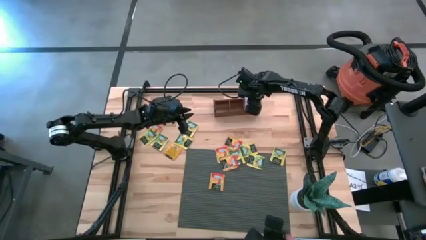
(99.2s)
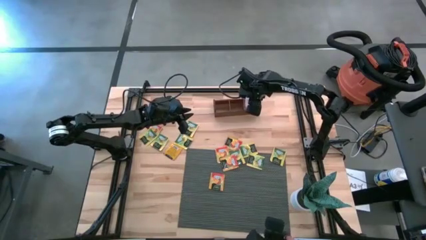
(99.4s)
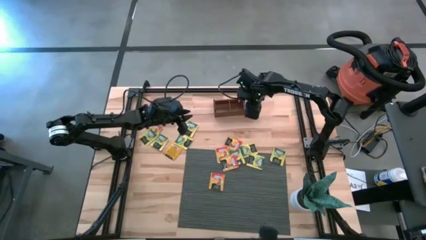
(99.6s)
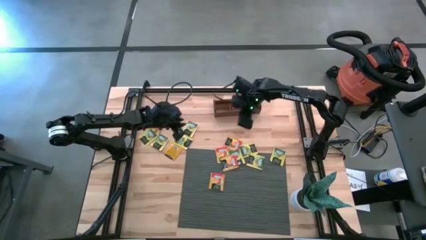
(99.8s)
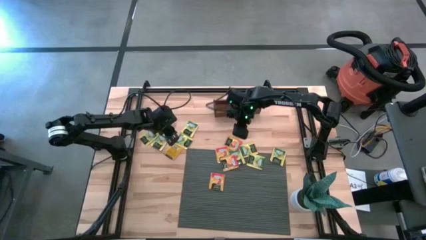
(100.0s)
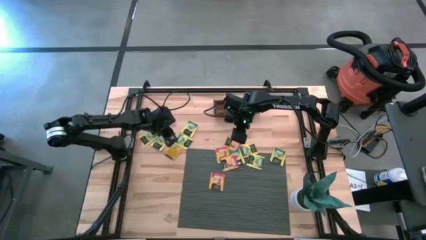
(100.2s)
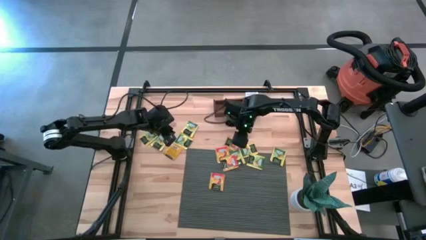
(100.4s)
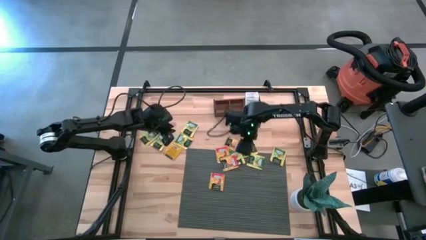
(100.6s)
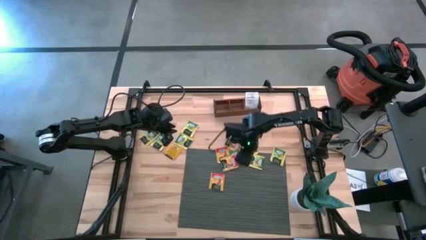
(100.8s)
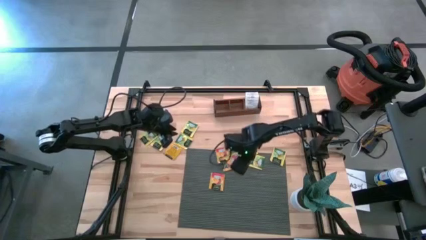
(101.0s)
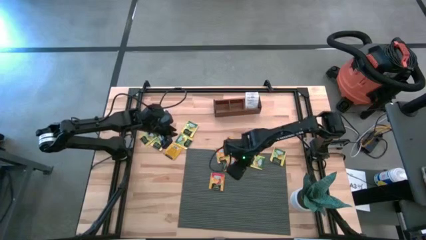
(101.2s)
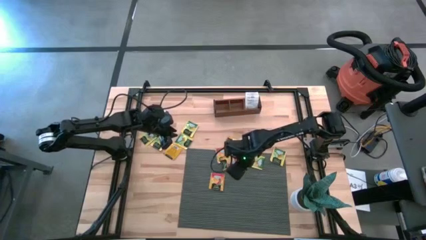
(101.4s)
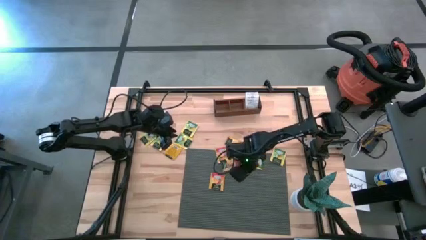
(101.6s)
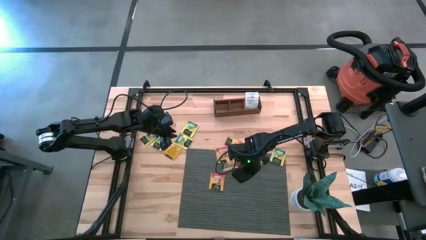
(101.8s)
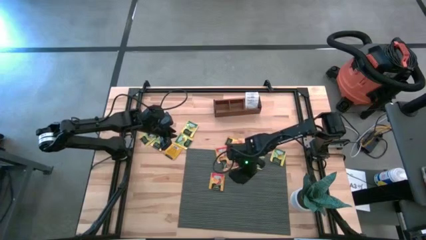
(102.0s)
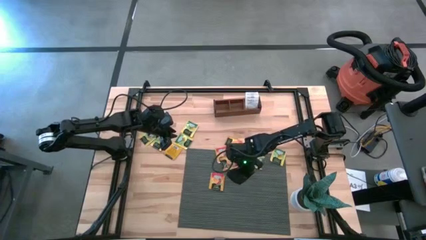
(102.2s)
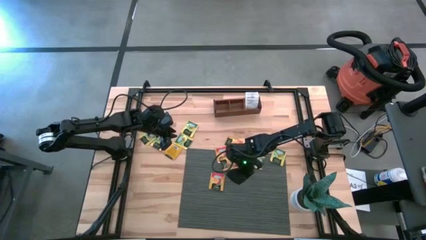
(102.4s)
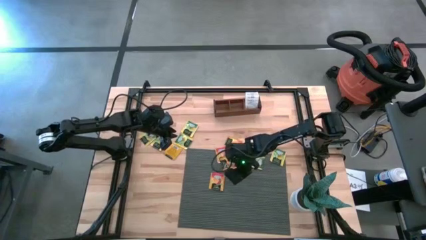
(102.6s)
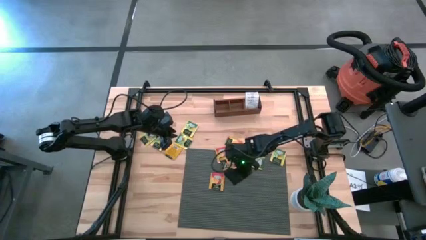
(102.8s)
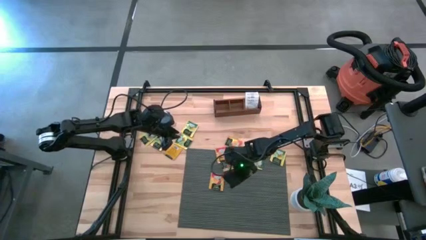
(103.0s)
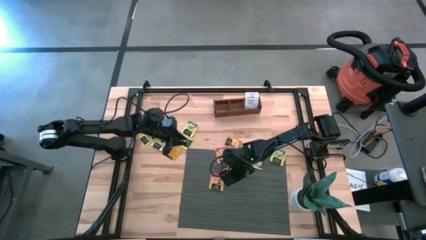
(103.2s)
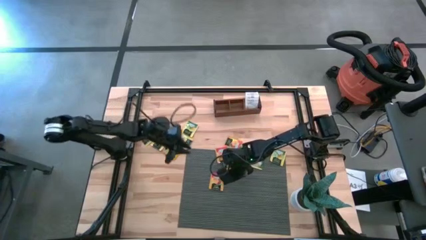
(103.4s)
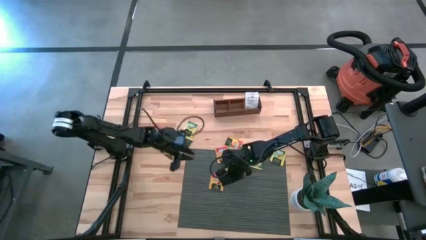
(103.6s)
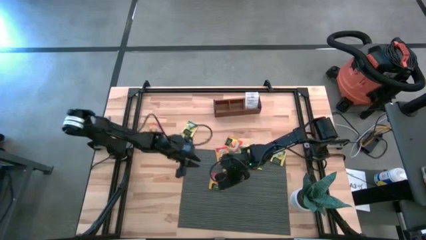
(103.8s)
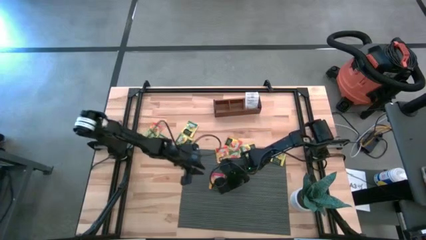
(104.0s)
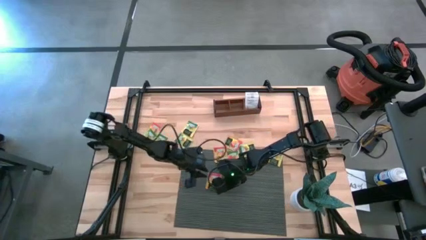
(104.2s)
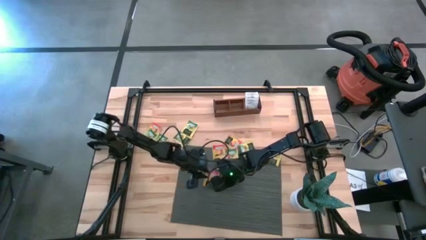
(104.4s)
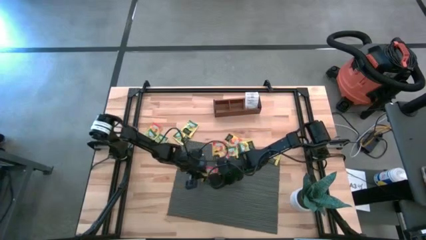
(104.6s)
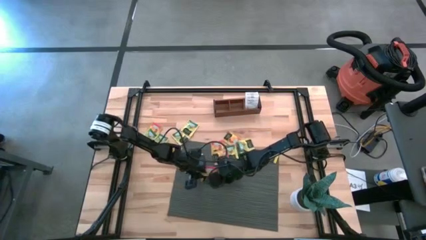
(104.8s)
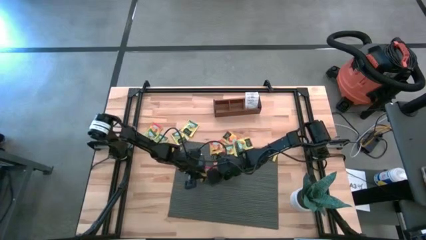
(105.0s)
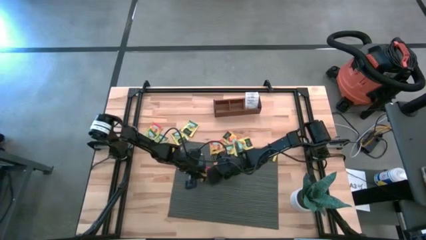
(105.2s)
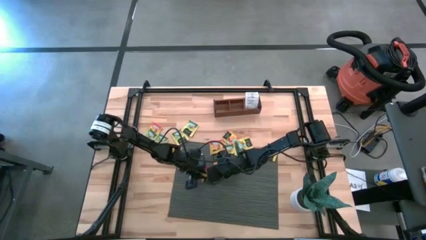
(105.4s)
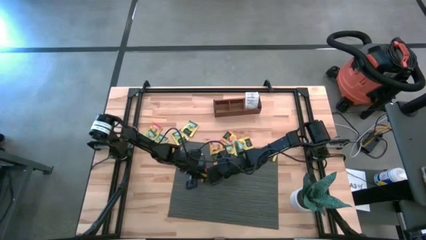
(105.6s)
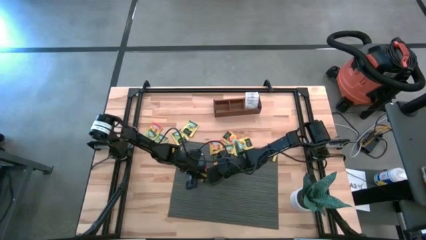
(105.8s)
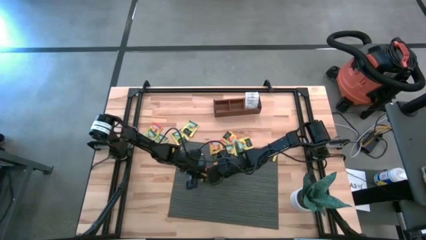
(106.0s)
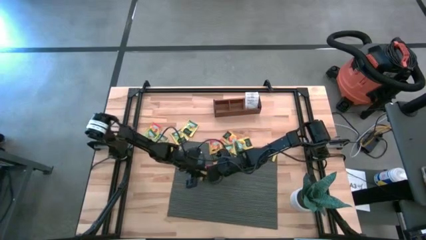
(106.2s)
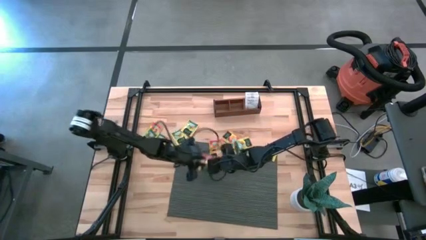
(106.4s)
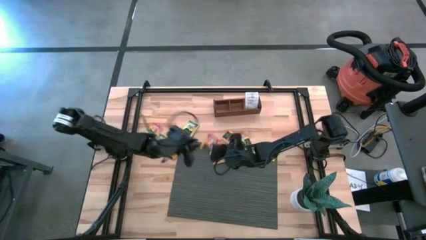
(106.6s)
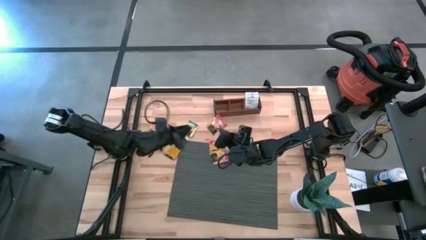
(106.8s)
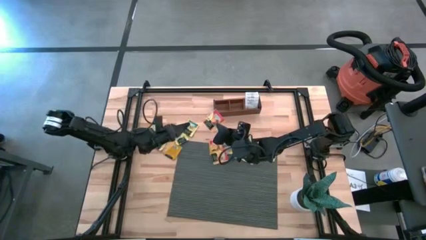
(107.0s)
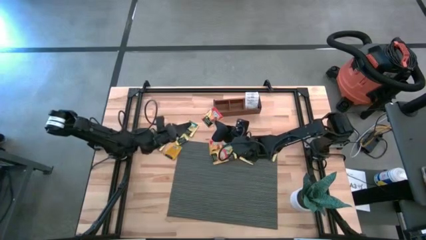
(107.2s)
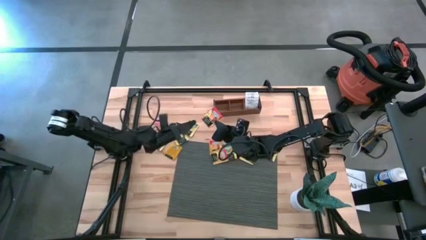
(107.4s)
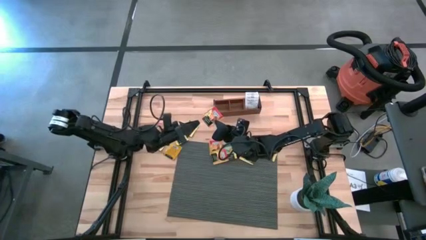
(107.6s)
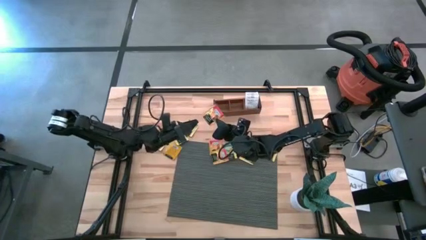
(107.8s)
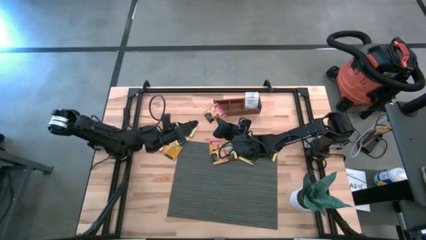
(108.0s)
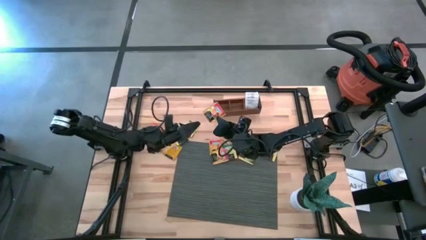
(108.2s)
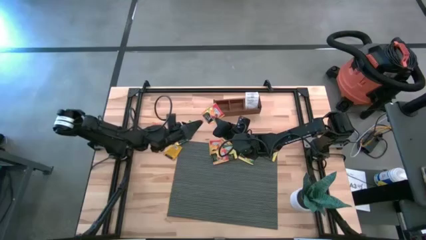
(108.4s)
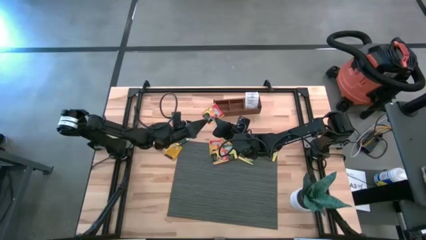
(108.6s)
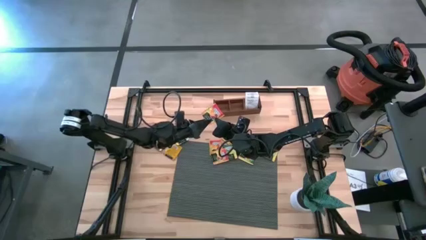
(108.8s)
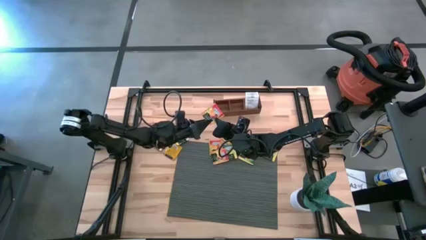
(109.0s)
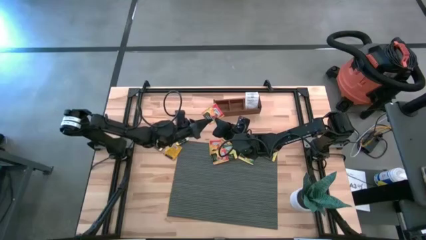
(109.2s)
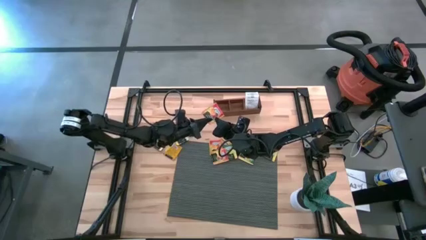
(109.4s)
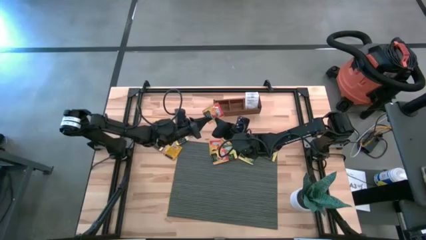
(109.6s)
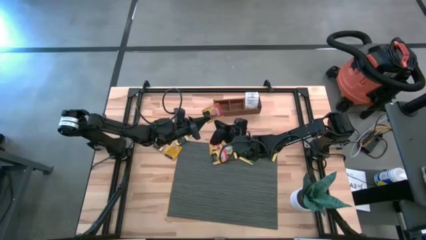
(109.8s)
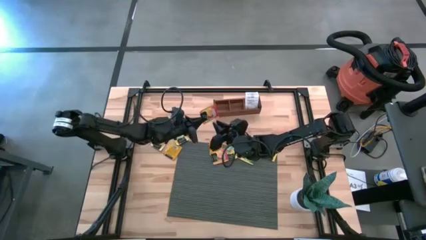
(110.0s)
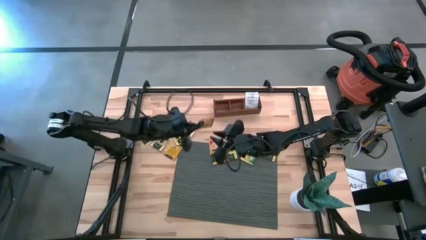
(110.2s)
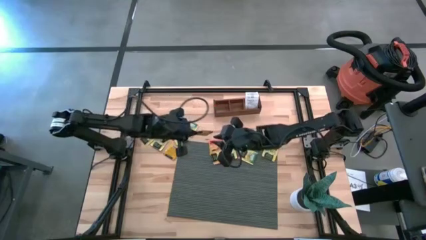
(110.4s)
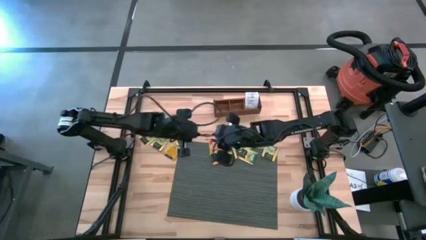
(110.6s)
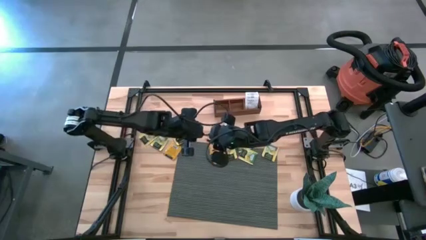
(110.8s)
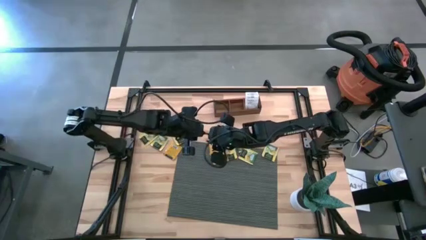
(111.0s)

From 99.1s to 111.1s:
Task: Pick & Place Tea
Put the orange tea bag into the middle section of the wooden organizer

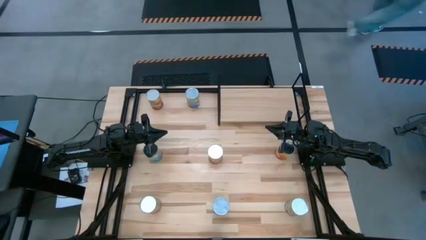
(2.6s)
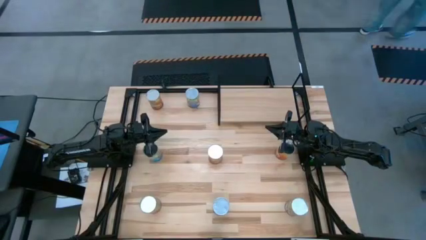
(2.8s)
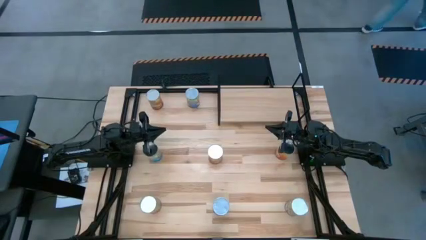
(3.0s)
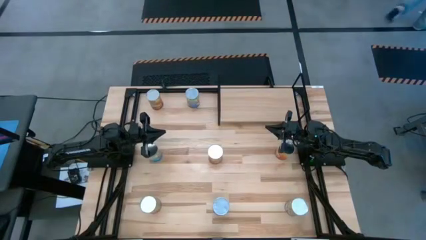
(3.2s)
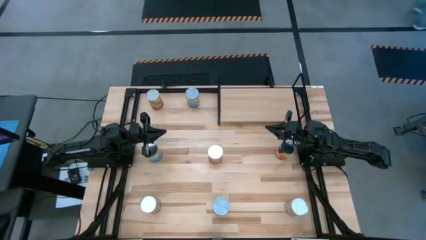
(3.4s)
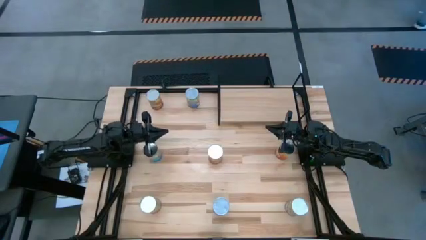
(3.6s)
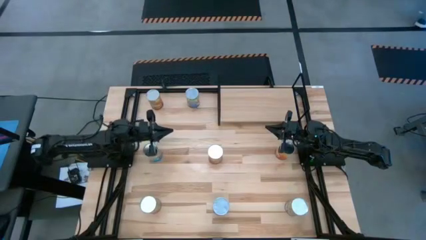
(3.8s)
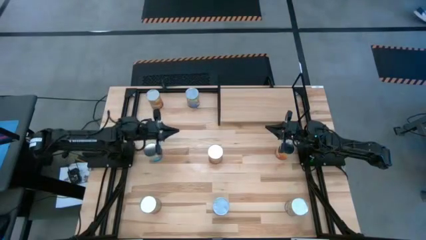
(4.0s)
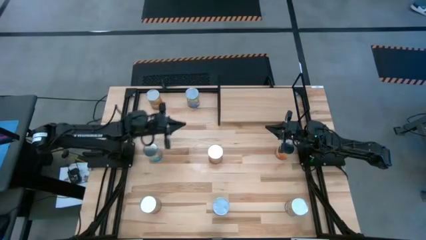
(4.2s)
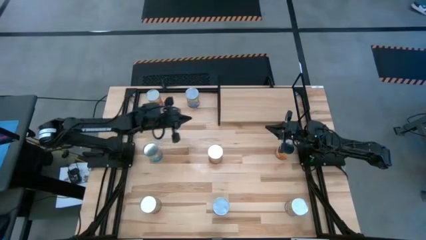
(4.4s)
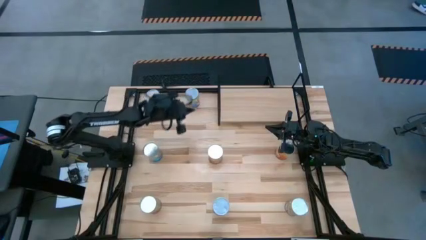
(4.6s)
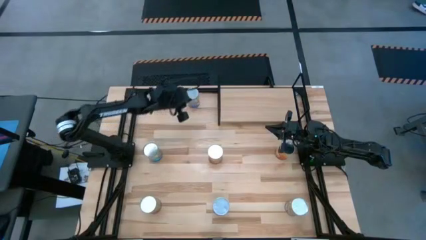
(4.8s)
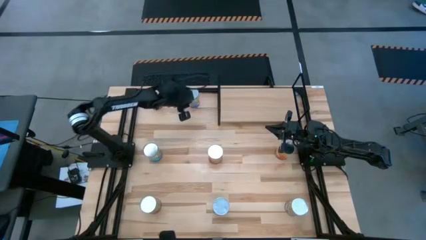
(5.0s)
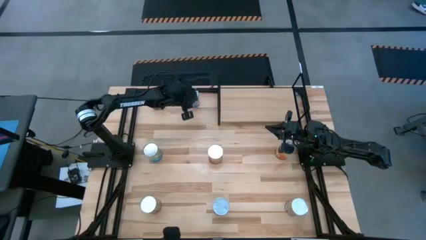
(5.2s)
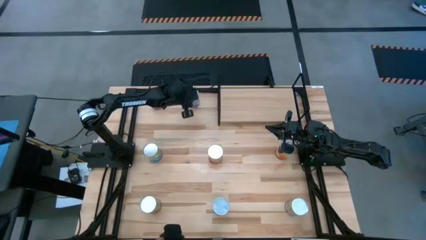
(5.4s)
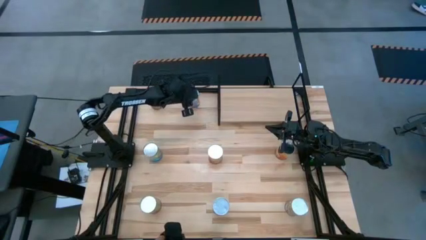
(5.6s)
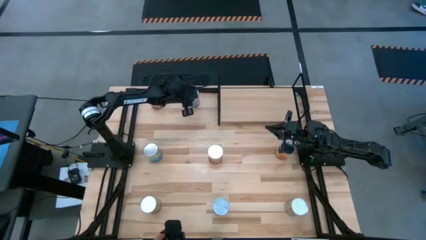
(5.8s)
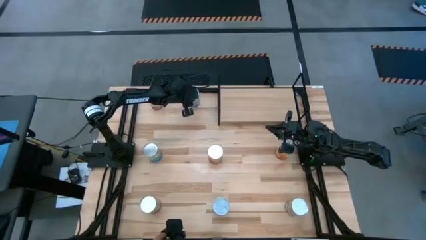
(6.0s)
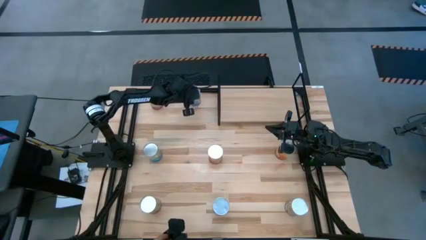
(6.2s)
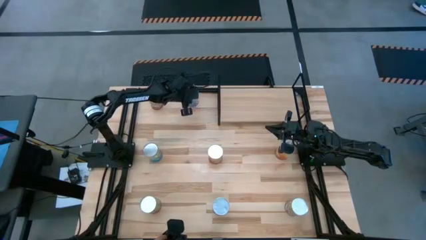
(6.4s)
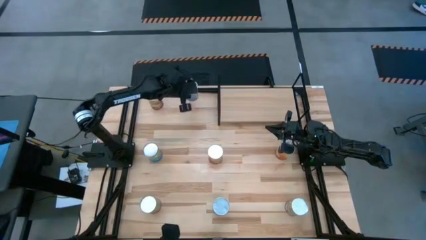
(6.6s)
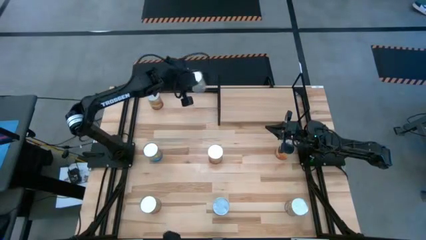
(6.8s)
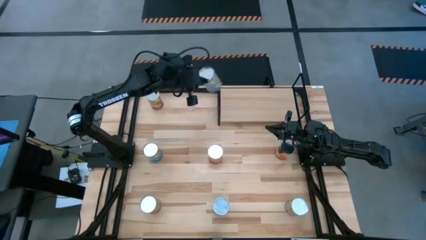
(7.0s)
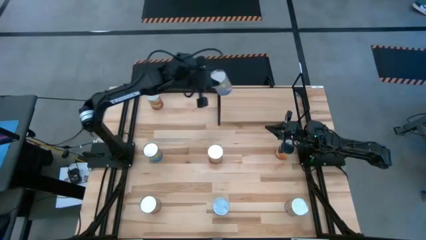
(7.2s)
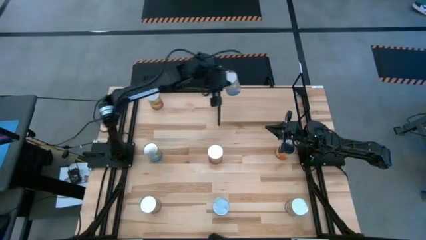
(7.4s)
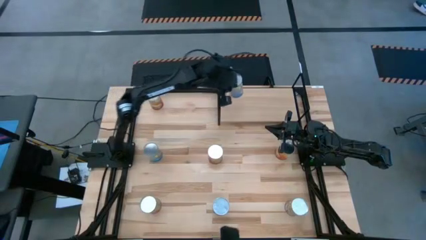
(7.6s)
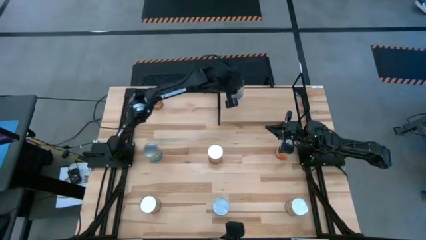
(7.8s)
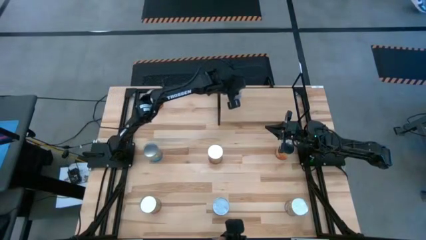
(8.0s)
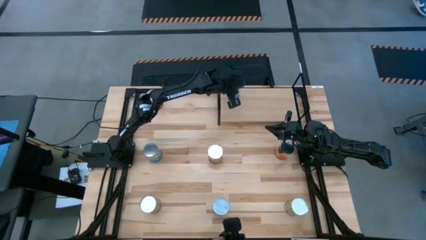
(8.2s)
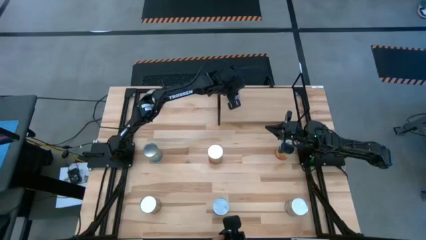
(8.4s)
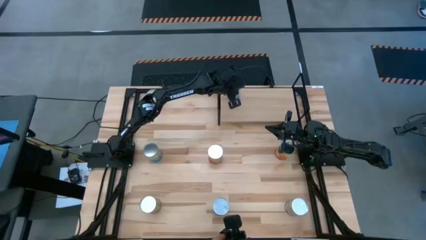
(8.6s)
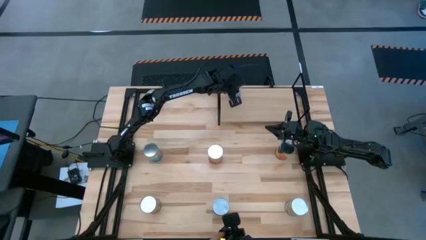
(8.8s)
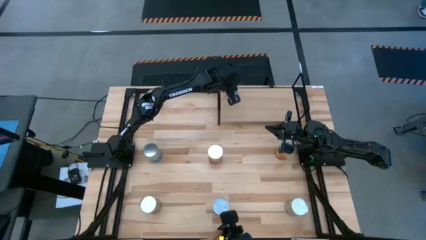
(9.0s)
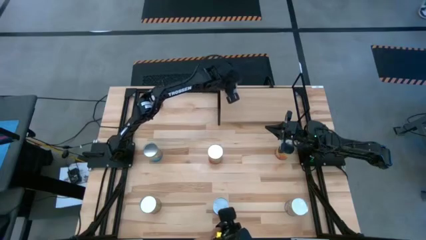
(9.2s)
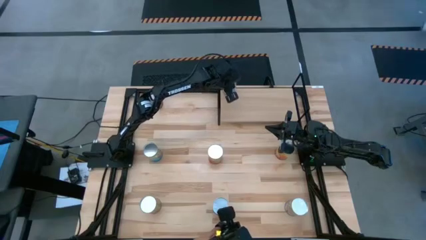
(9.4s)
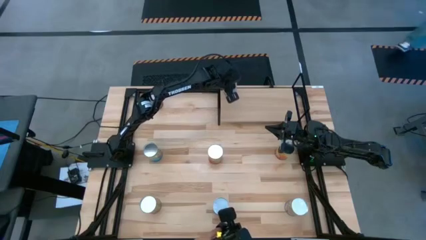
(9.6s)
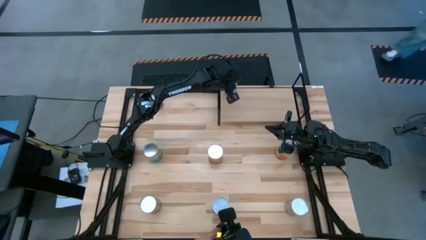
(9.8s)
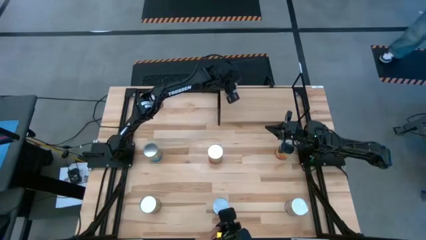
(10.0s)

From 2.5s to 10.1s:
Task: Pick and place cans onto a shelf
Put the canned peaches on the shelf
